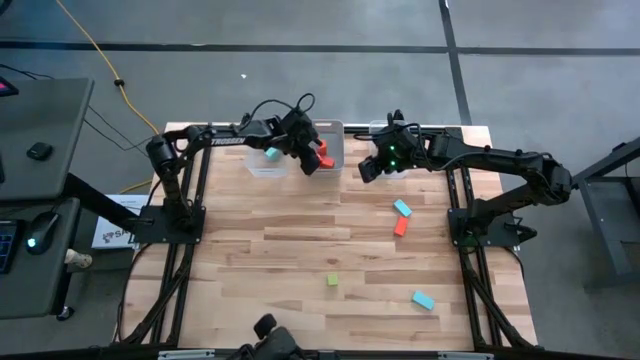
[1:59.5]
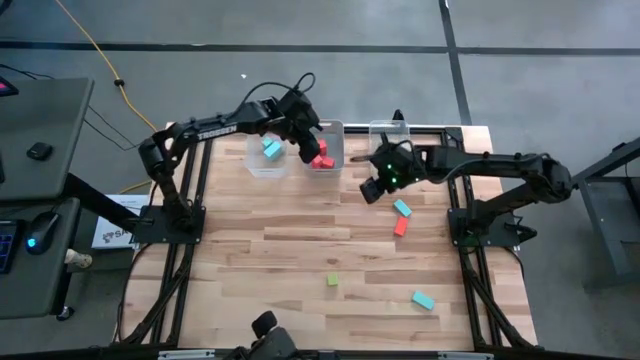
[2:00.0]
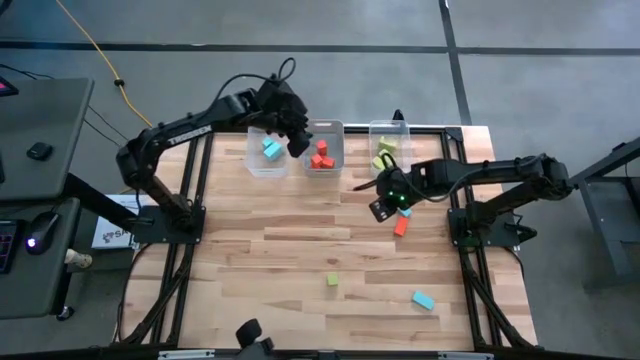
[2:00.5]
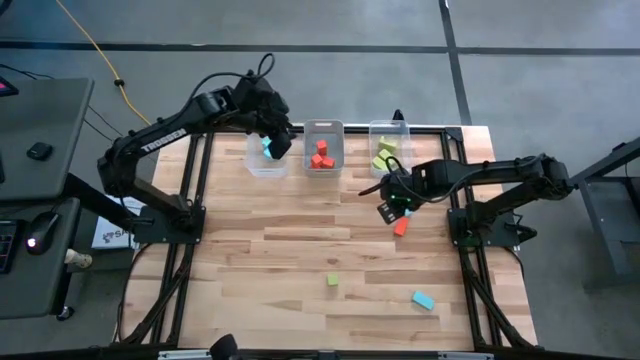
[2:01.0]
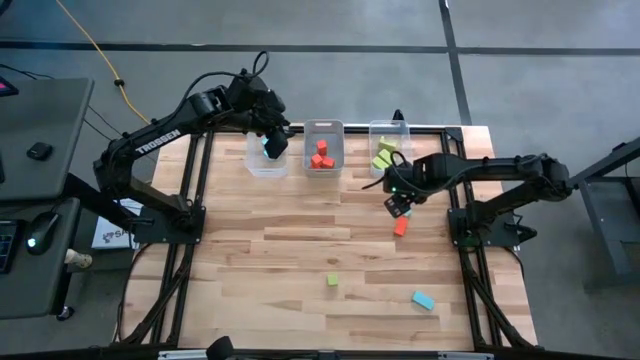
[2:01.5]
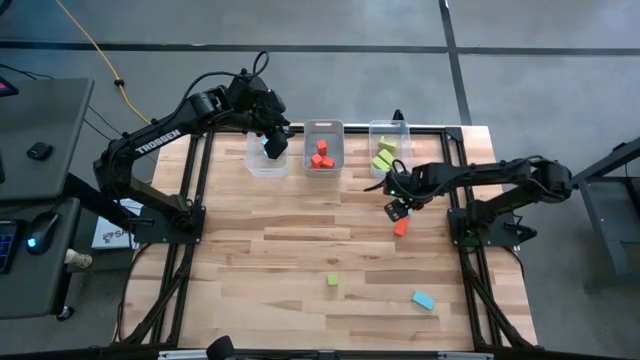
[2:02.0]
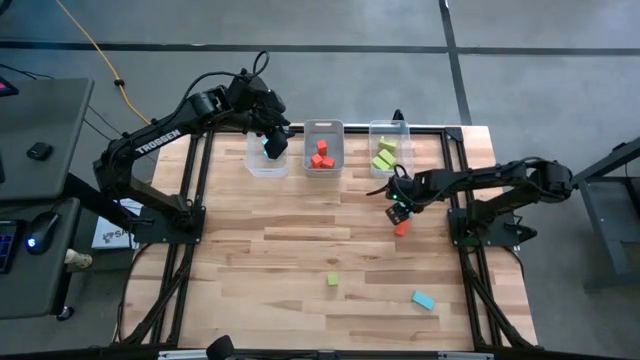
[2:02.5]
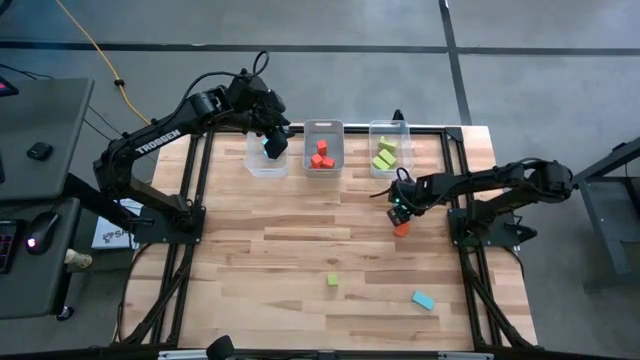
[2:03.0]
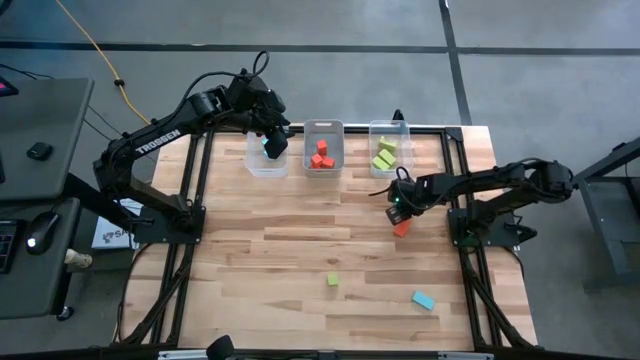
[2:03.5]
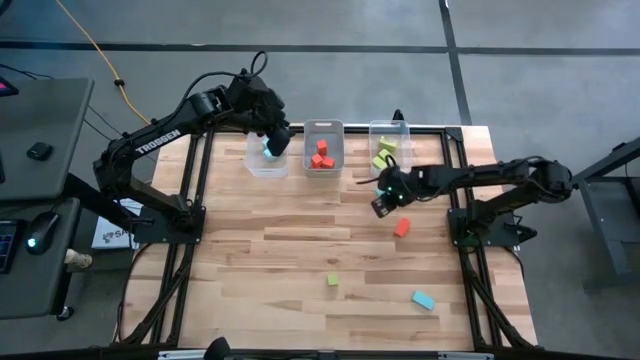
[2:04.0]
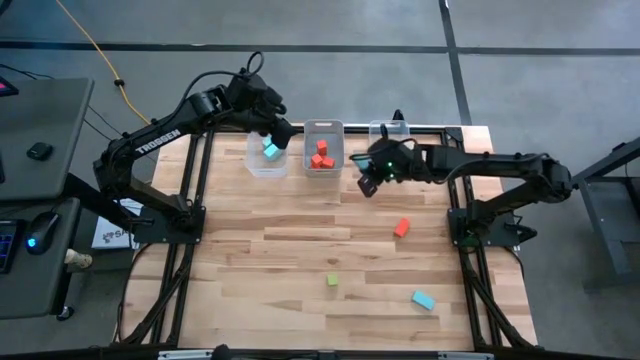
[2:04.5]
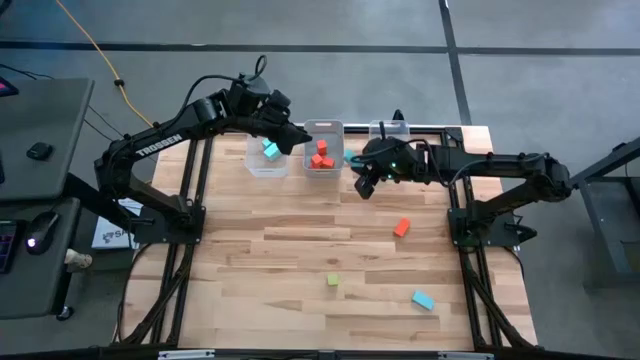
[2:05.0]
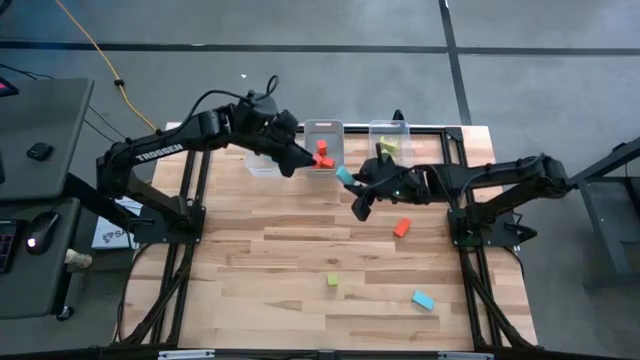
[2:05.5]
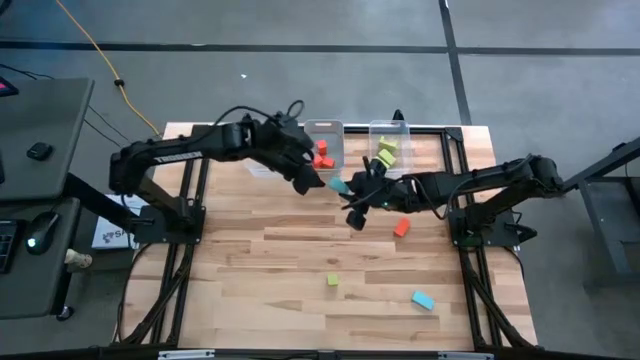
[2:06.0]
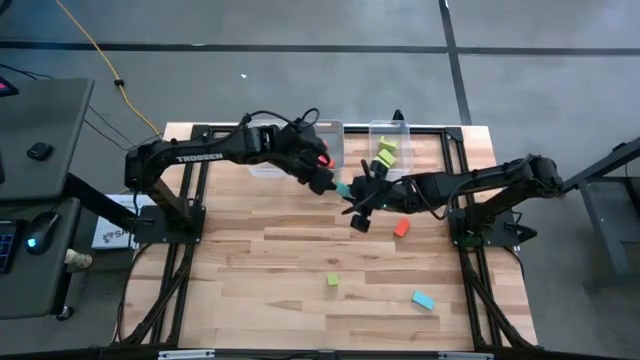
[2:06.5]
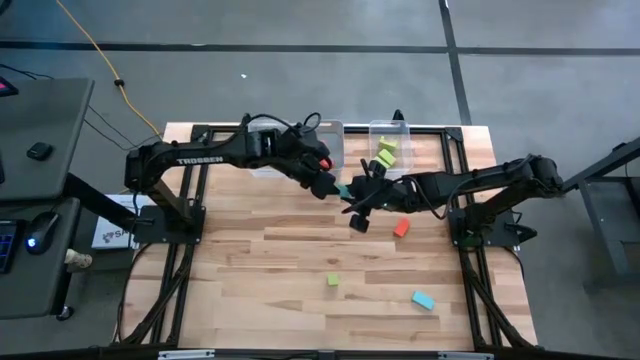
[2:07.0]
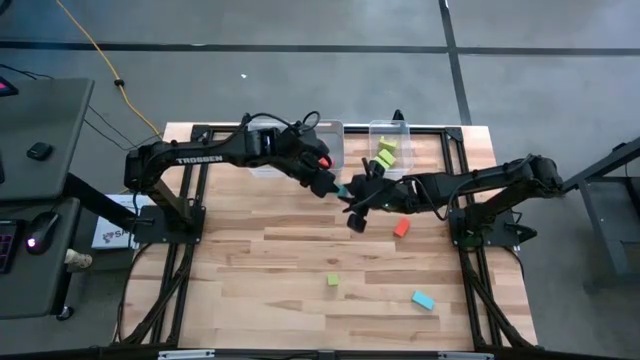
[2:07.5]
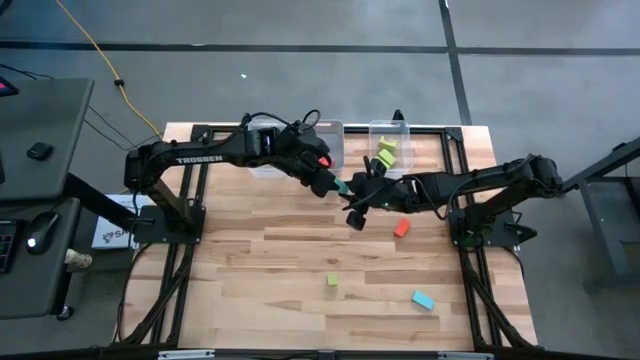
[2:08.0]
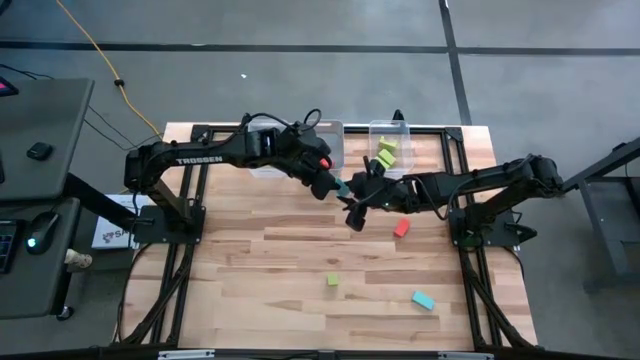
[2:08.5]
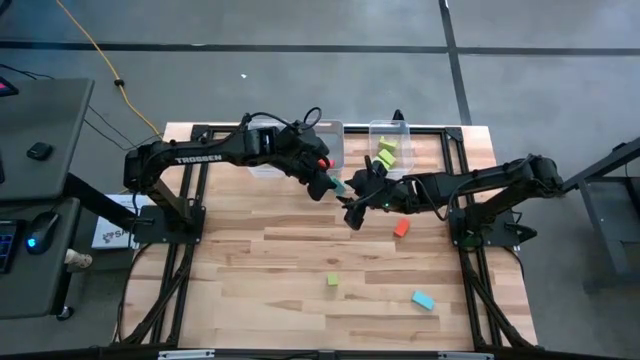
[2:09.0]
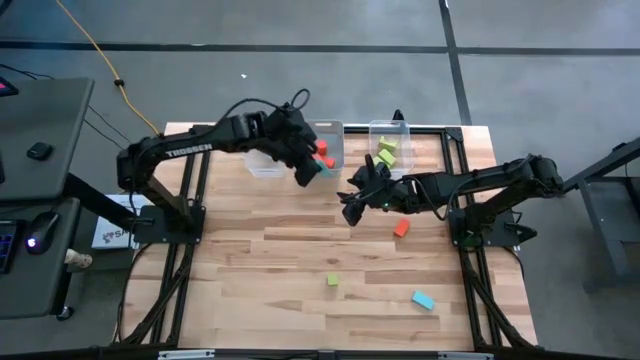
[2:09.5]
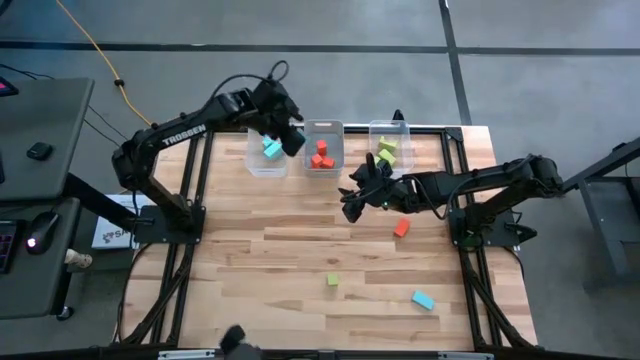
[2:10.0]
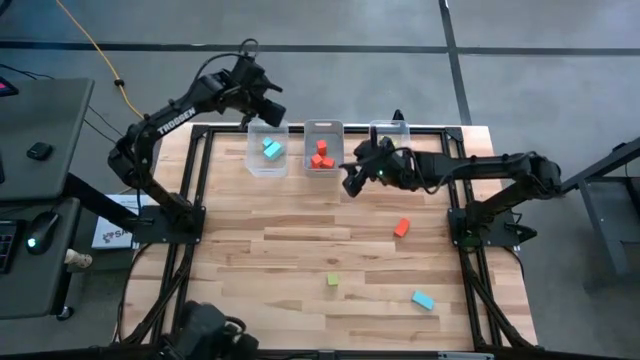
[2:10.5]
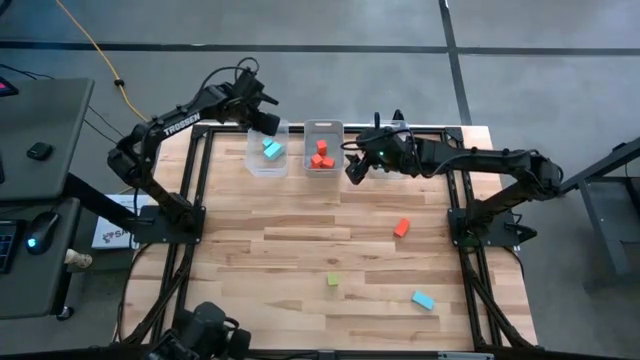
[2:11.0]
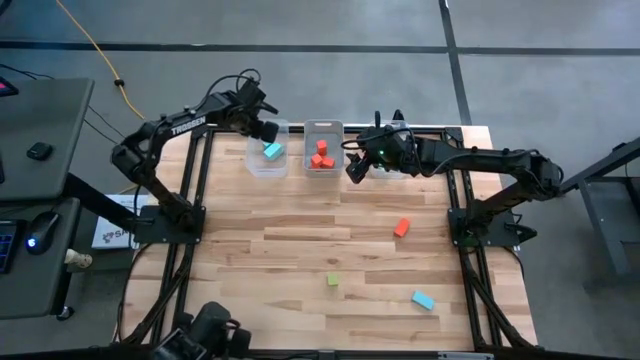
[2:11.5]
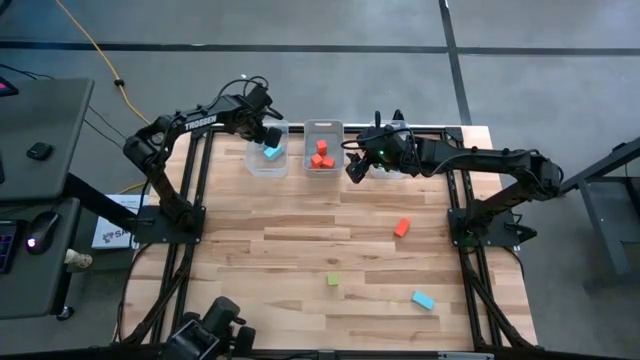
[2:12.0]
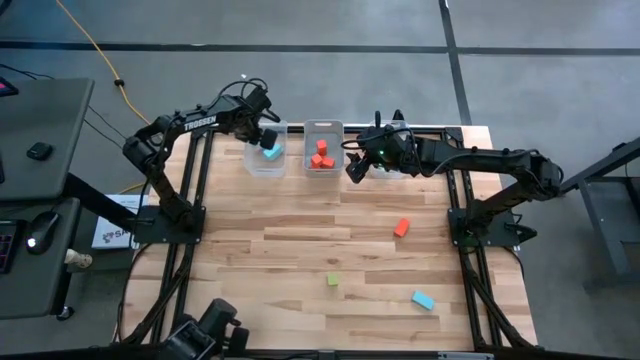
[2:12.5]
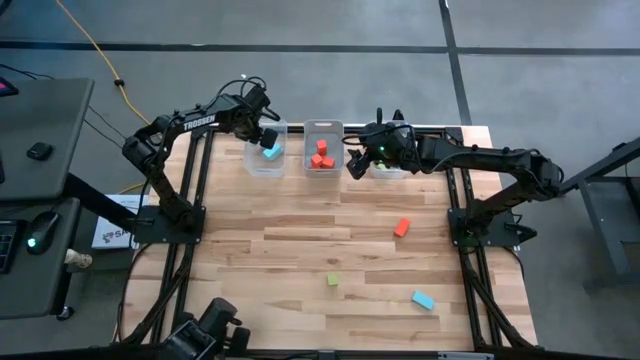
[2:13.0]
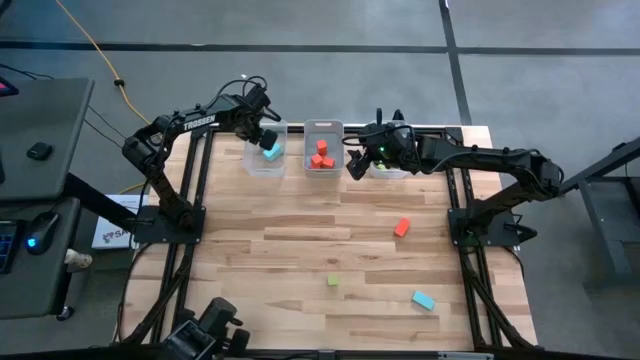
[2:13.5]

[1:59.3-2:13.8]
Task: Sort & place blocks by color
Put the small blue rectangular block into the left transparent bin

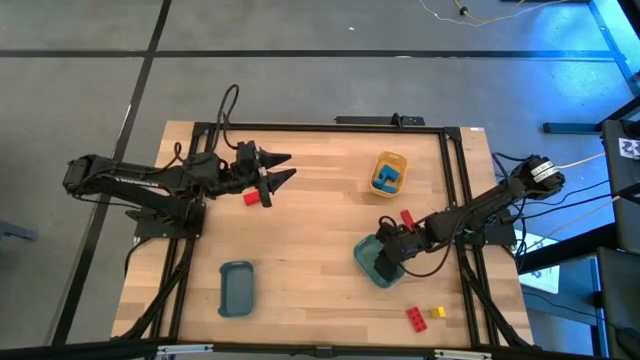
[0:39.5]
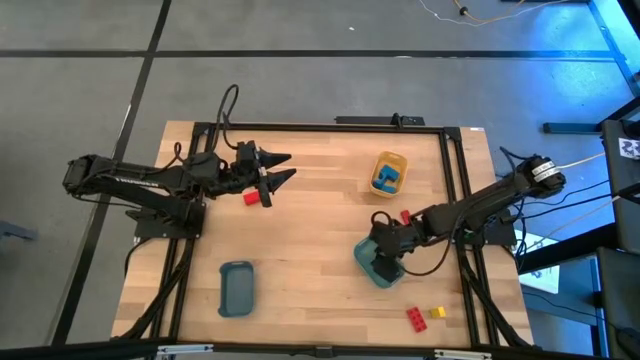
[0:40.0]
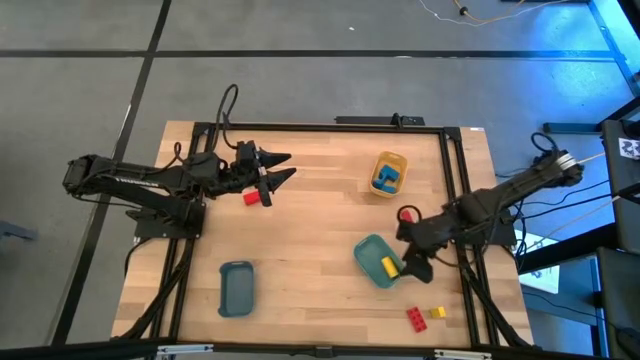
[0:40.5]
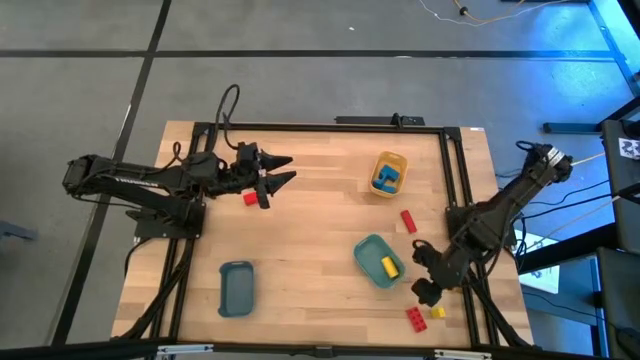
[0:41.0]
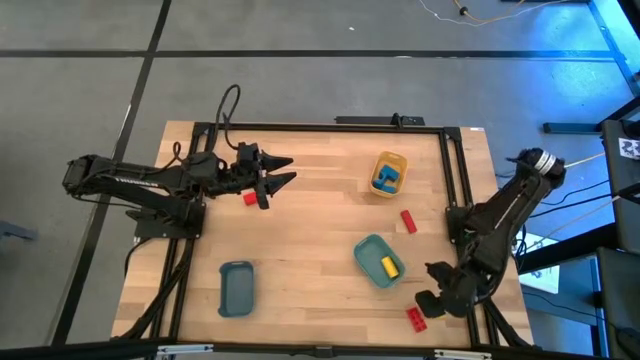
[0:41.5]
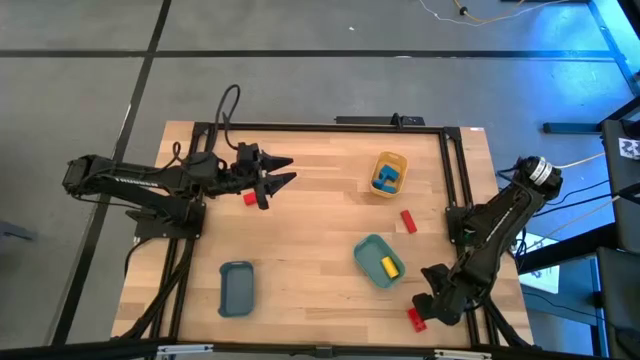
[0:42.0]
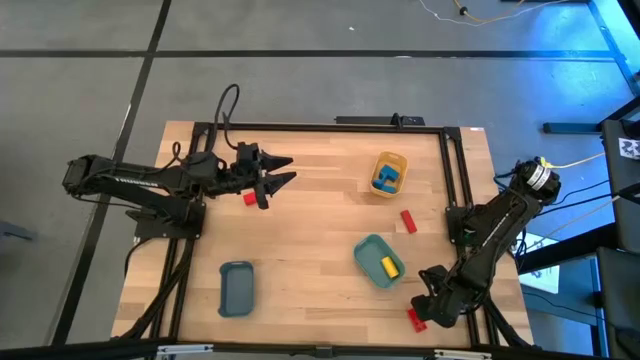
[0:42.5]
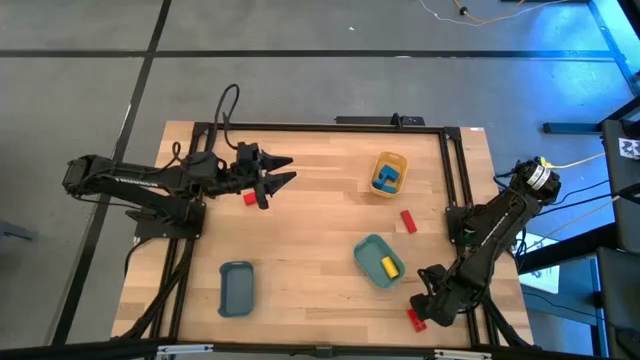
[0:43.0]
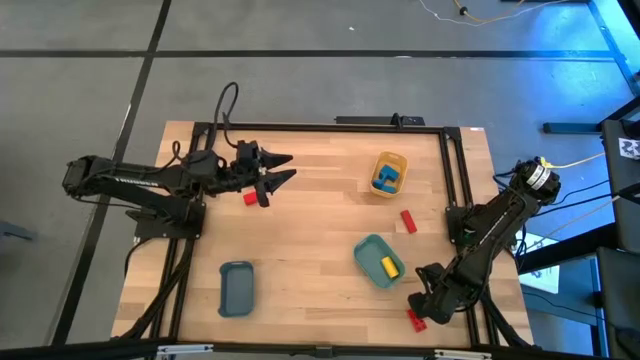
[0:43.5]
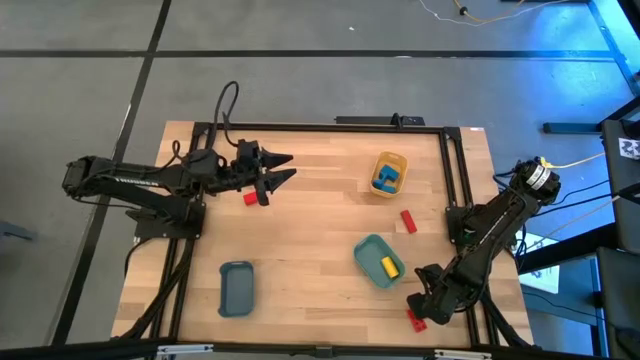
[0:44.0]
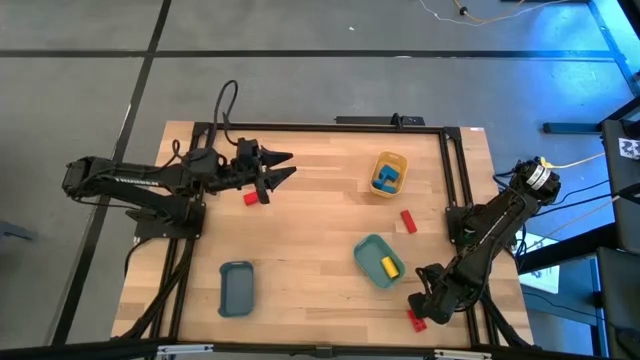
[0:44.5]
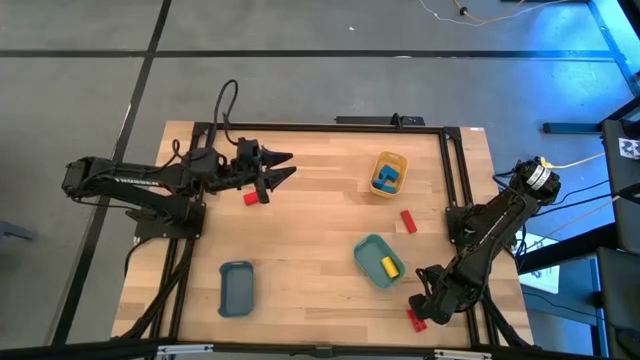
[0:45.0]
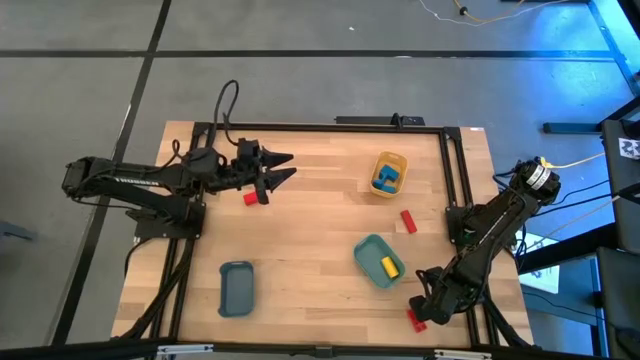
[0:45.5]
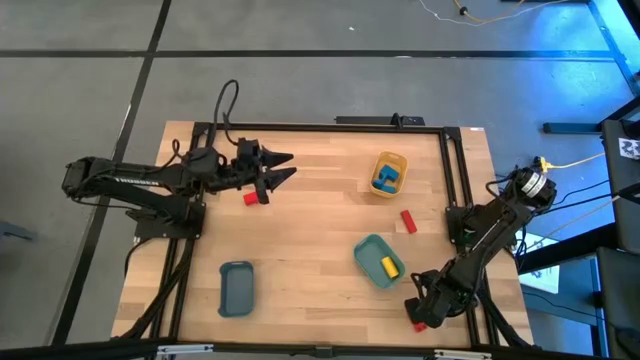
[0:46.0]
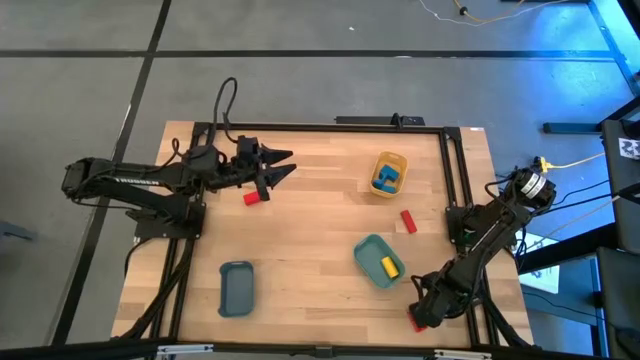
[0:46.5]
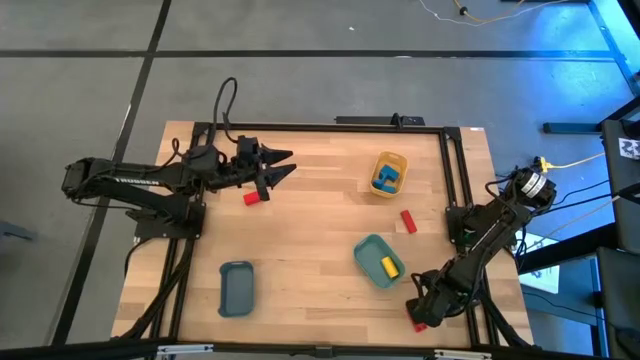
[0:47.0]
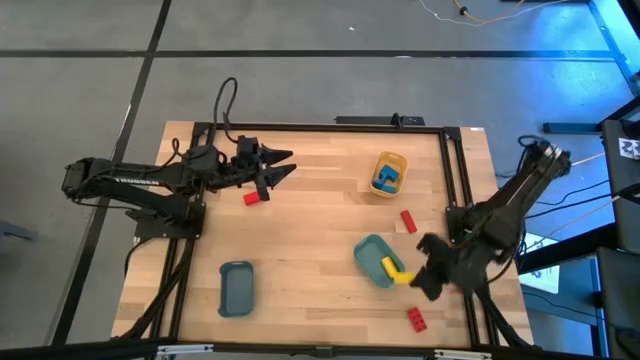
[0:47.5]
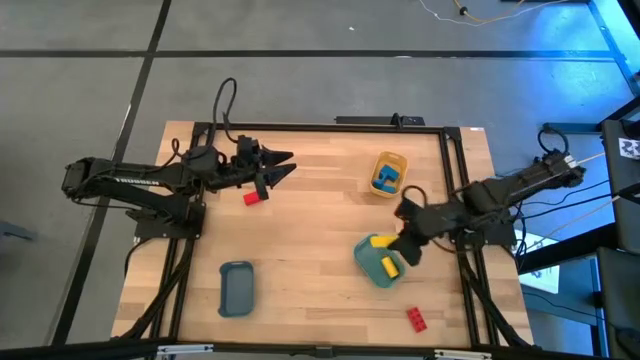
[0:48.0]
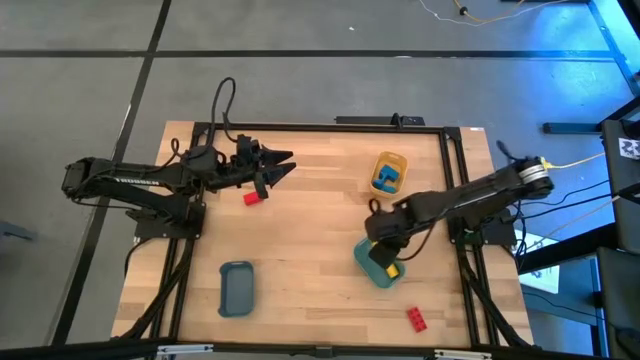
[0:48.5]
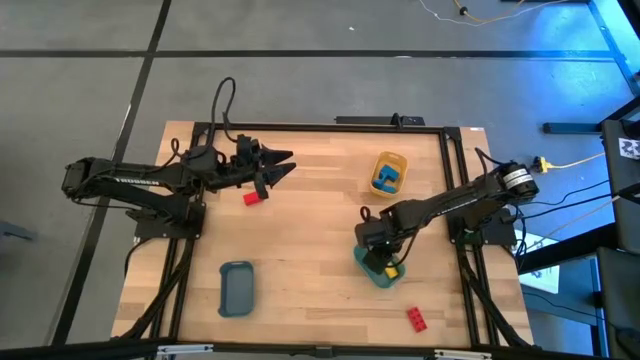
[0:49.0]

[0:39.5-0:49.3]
Task: Sort & place blocks by color
Put the yellow block into the green bin
